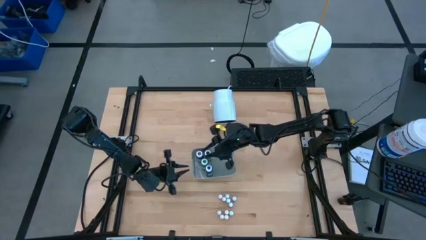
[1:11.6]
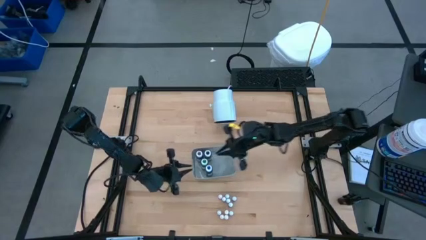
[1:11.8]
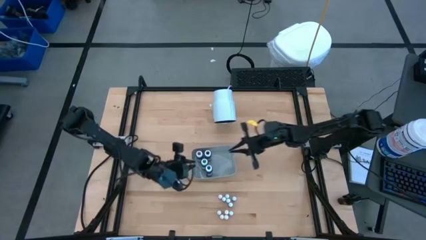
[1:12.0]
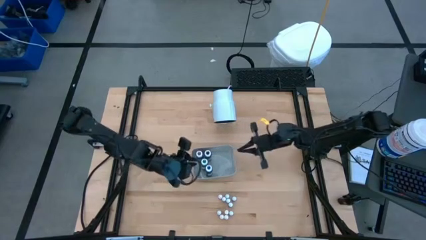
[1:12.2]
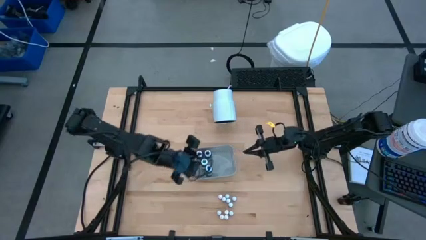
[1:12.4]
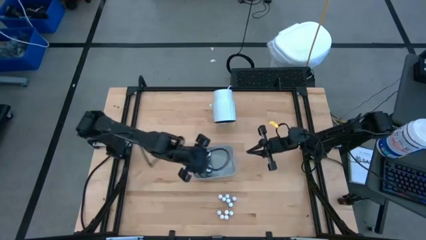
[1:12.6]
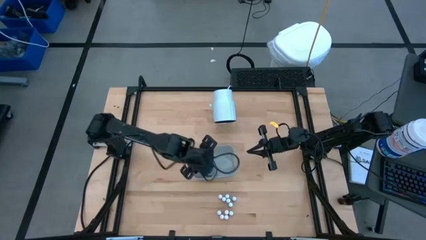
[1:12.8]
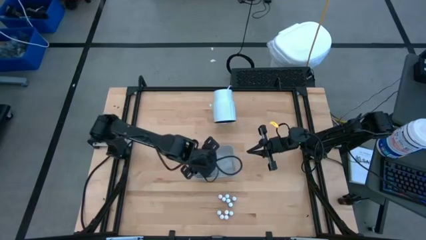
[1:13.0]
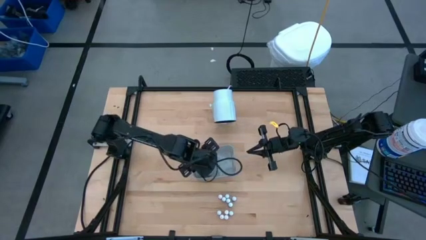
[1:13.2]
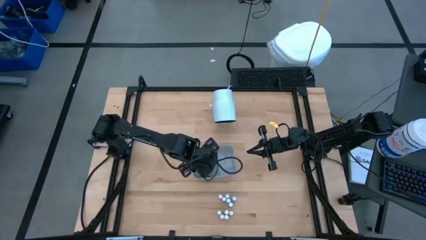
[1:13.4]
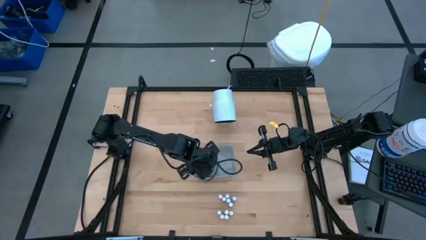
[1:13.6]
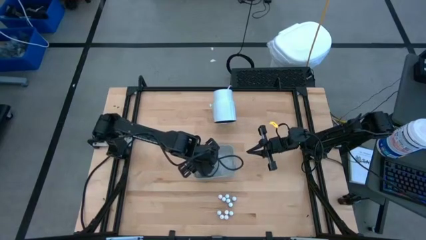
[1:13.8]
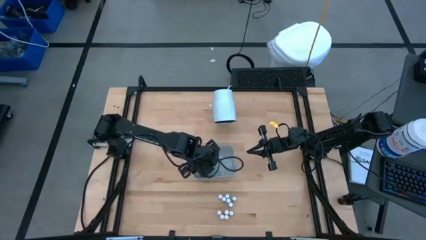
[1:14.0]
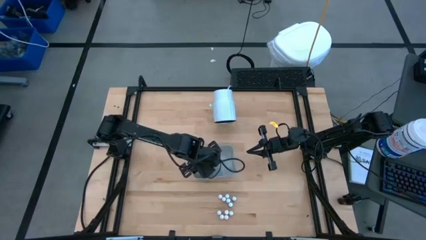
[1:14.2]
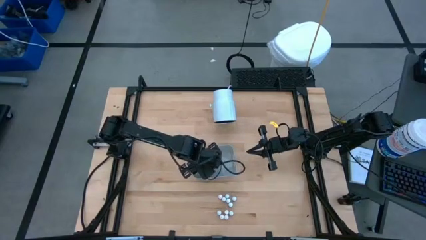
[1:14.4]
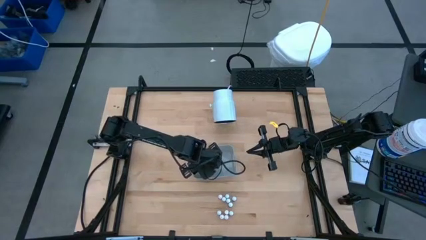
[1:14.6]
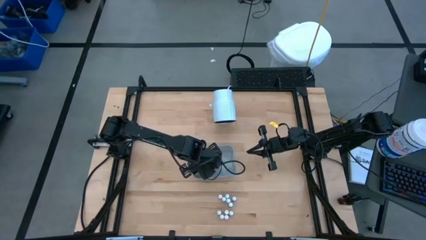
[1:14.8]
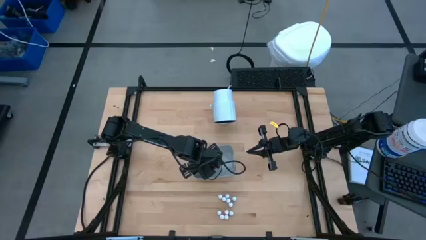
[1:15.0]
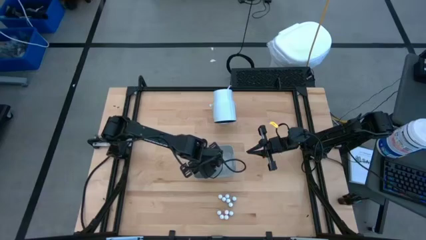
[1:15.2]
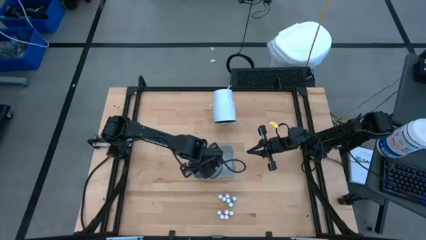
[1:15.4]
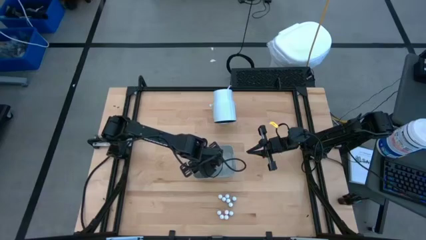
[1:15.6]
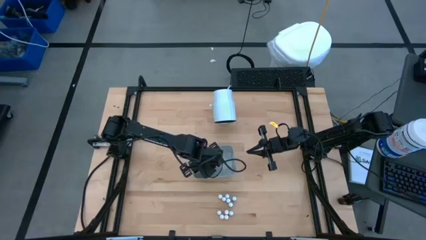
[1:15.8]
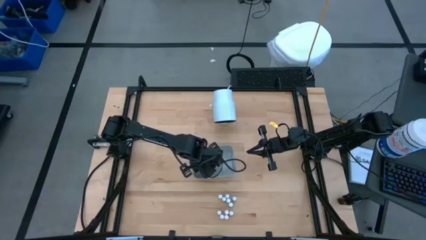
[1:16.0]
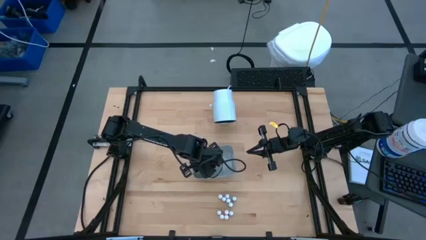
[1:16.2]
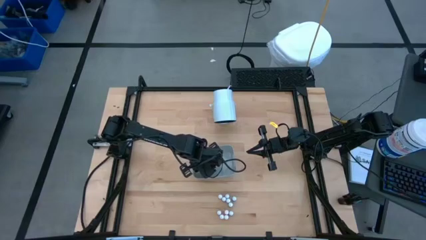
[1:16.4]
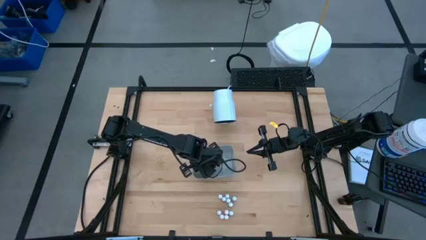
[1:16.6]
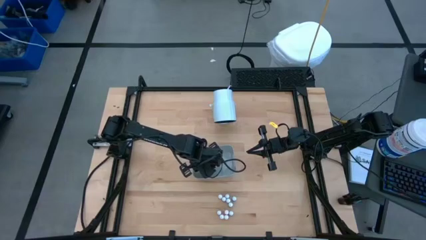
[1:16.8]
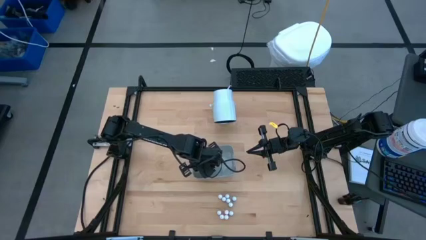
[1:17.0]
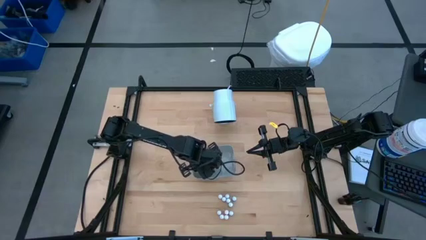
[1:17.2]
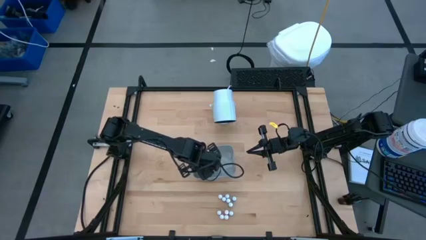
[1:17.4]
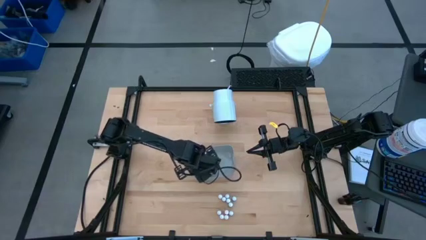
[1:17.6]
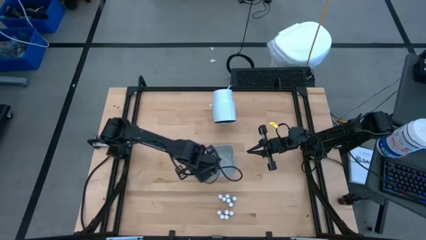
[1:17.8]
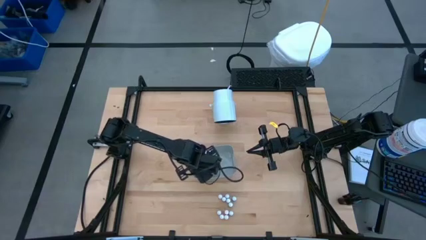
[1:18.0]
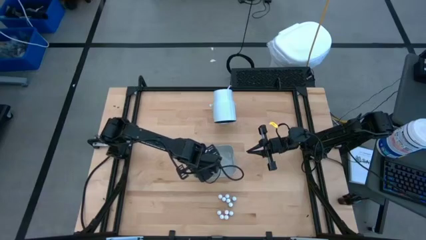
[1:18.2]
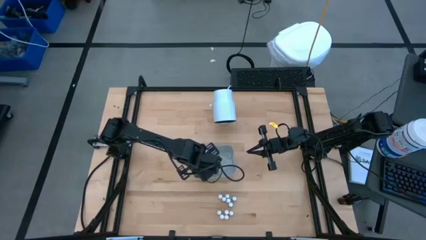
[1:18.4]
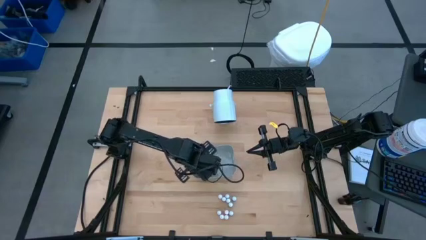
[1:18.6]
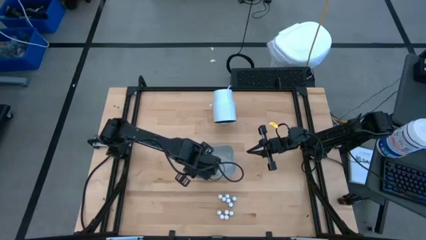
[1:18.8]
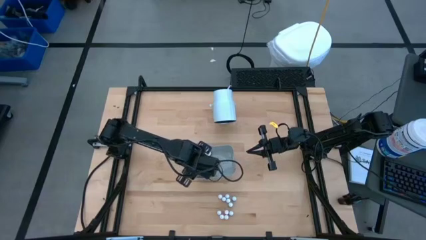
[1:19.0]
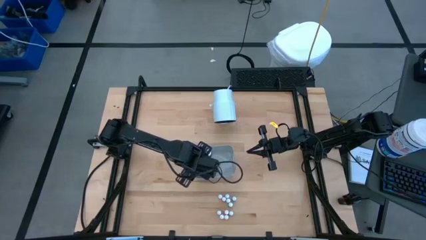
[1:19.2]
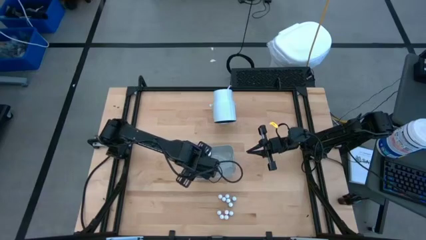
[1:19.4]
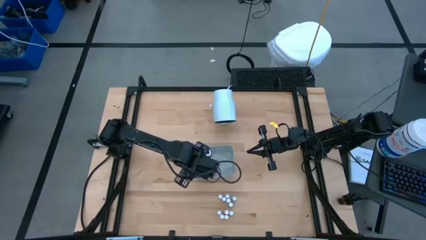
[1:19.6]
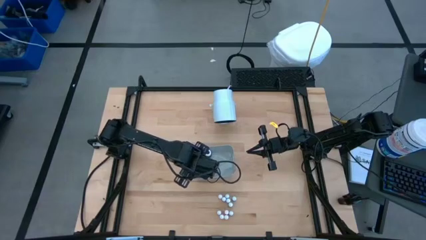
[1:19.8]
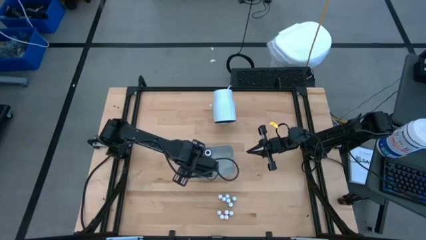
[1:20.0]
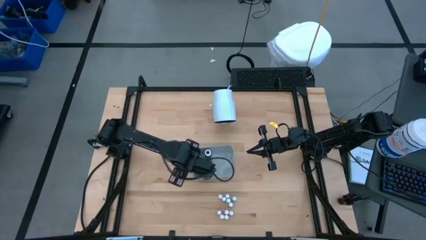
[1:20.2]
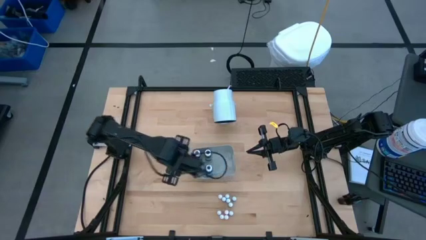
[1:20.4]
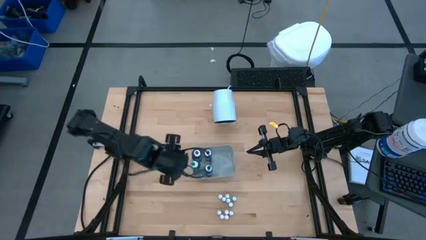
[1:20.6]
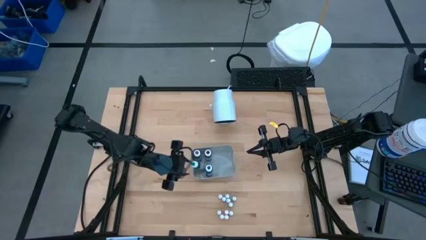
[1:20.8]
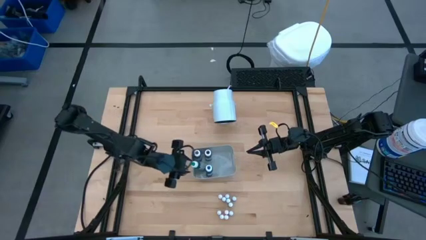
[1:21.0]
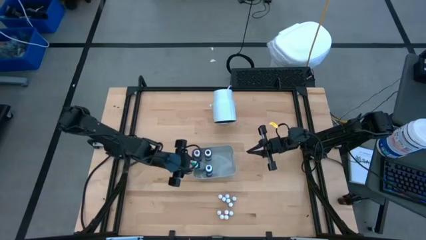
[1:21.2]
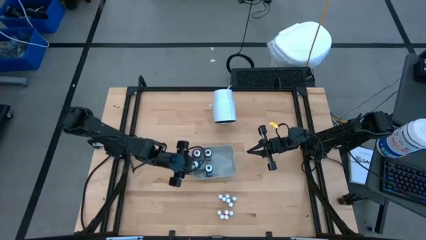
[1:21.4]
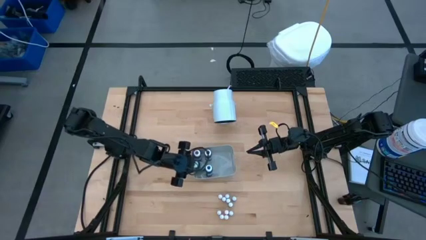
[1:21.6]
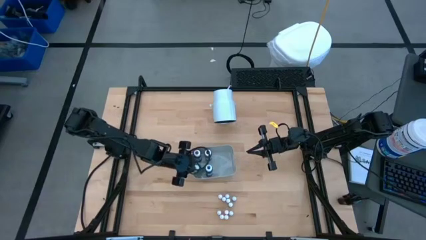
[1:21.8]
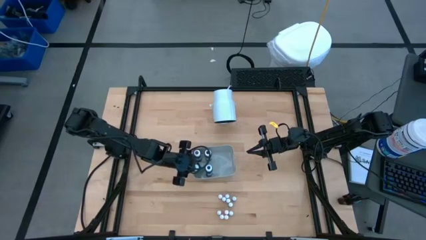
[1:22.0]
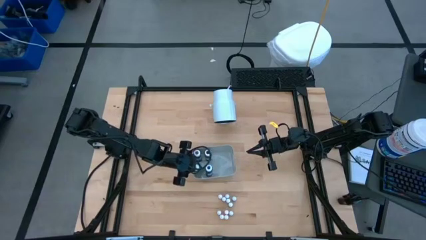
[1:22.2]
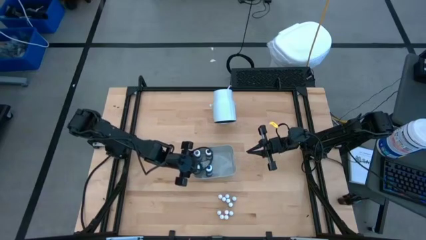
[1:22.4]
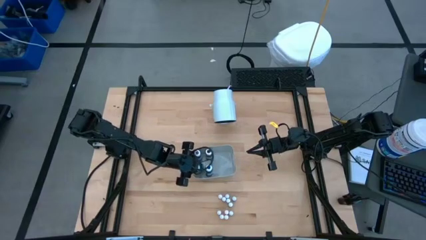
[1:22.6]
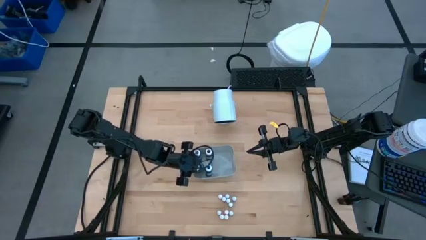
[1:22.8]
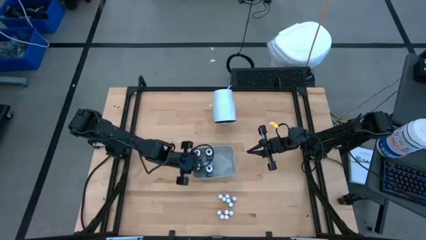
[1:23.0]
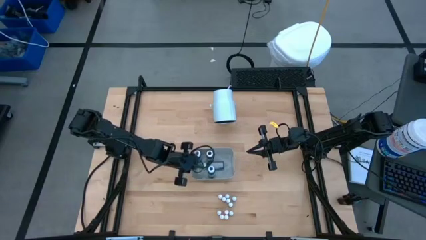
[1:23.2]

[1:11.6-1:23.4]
Task: Pick & Place food coloring
Adjust the large green food coloring bottle on the gray bin
